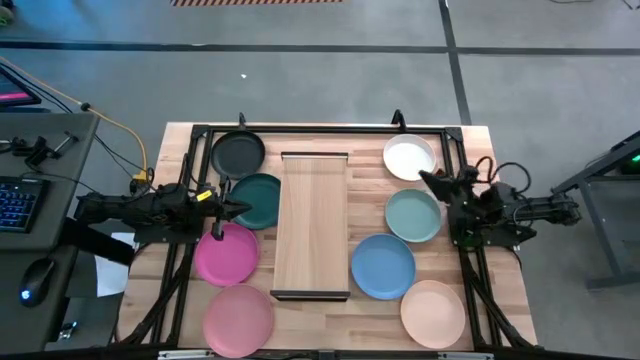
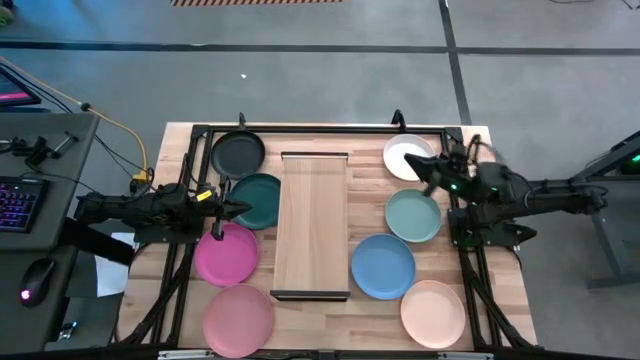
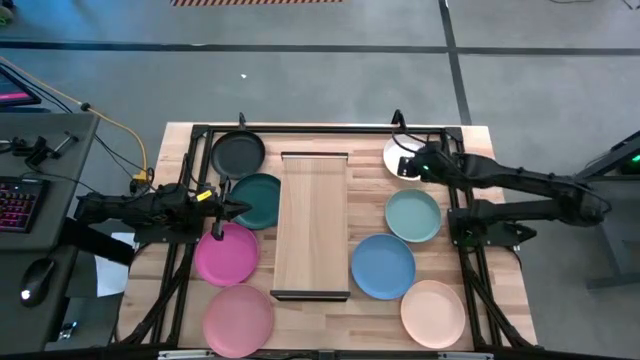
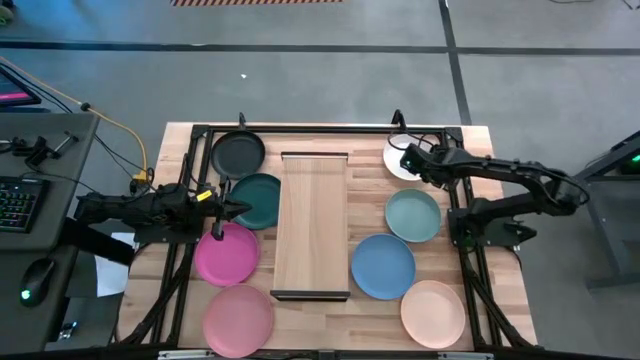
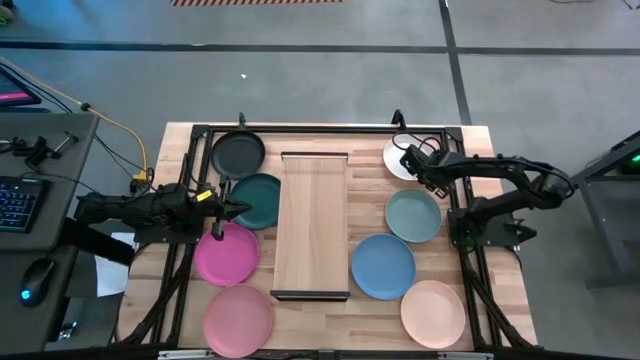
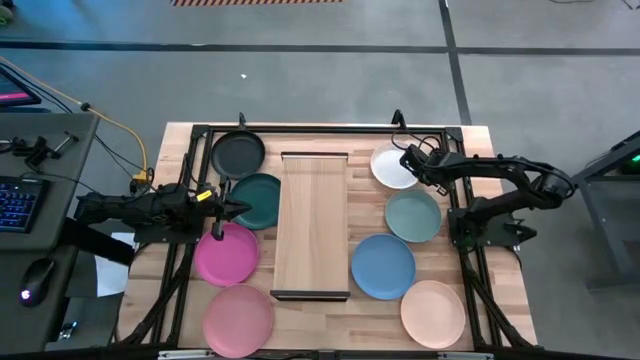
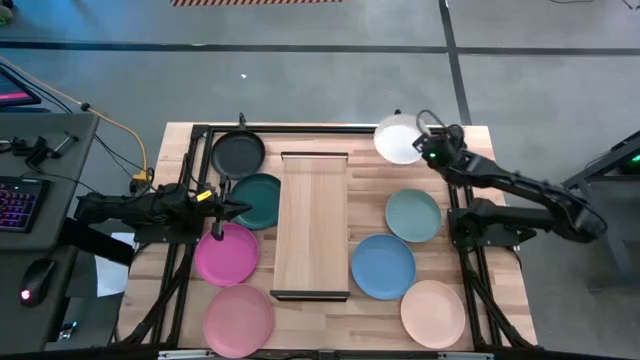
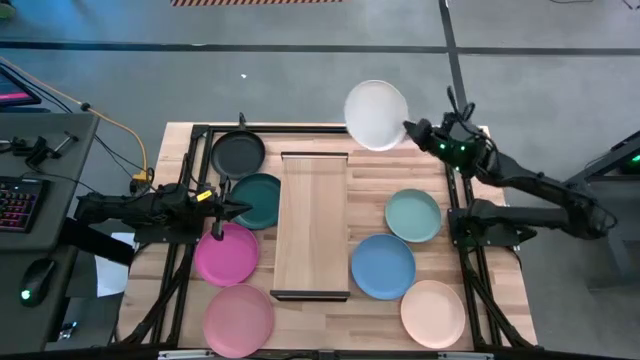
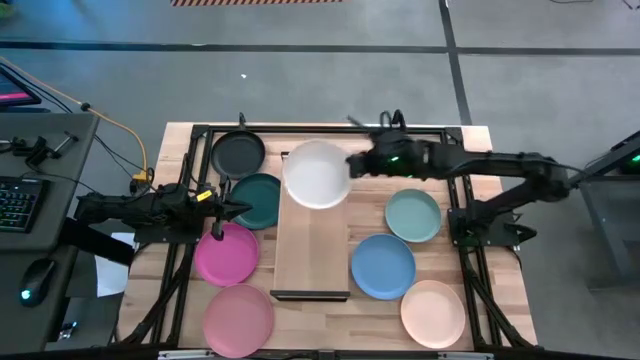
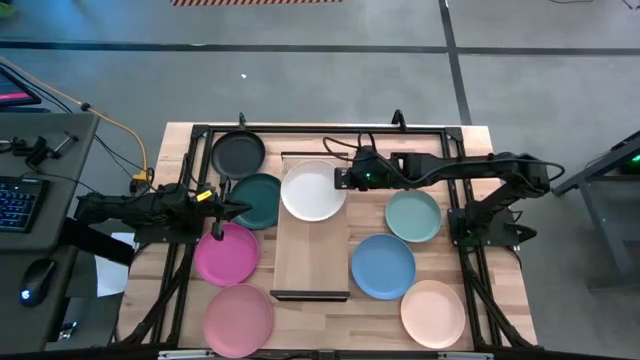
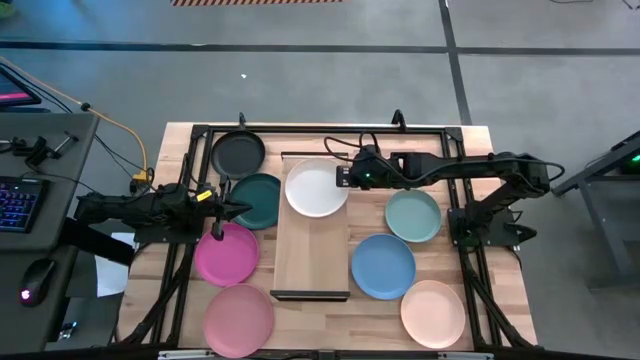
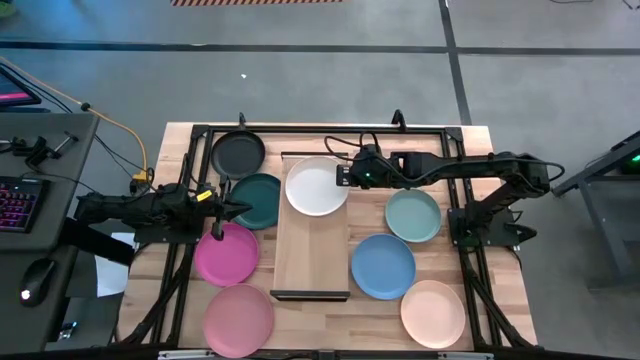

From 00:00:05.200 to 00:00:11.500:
Task: Place and stack plates onto a shelf
Put the white plate on the shelf

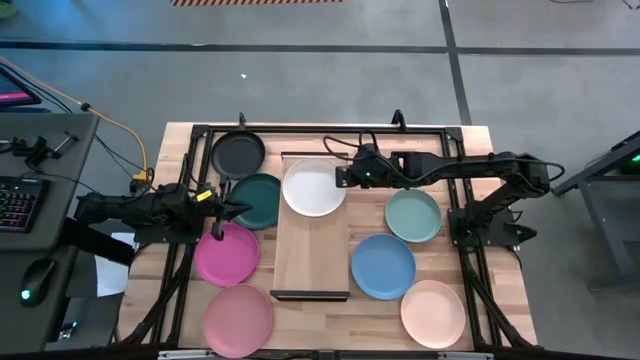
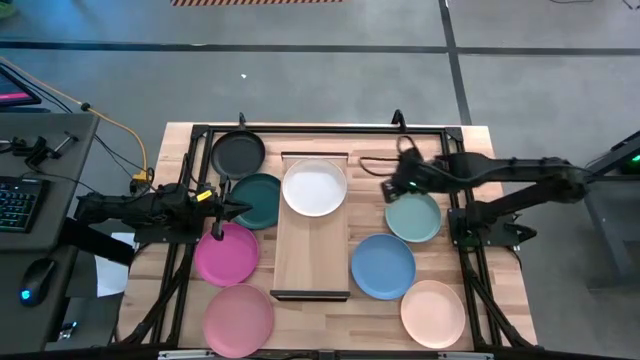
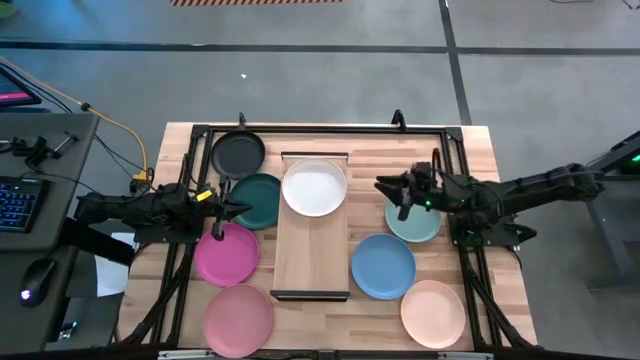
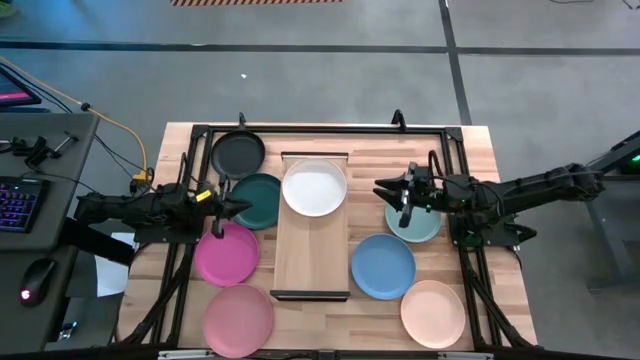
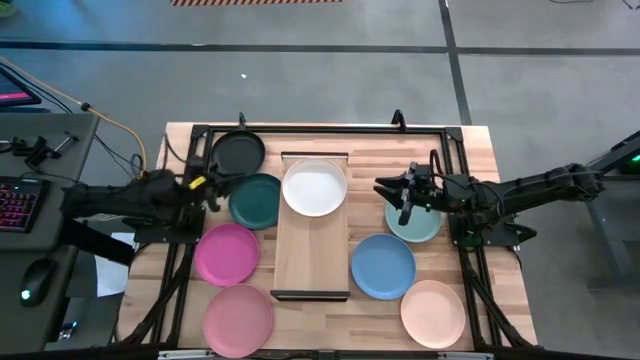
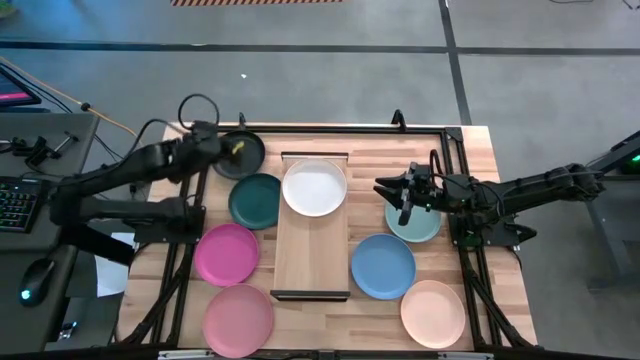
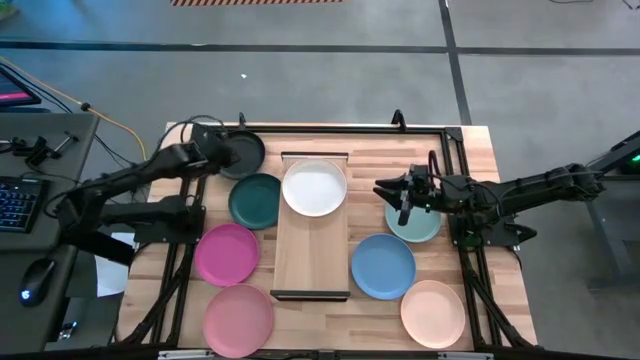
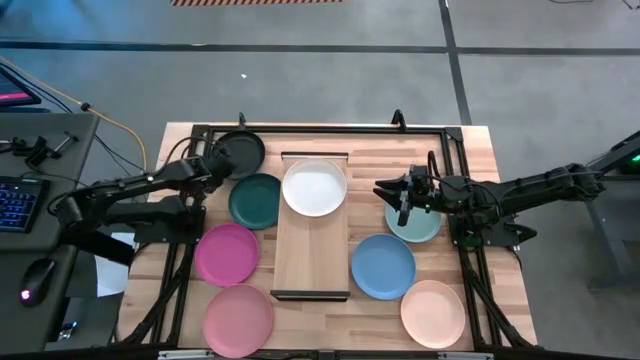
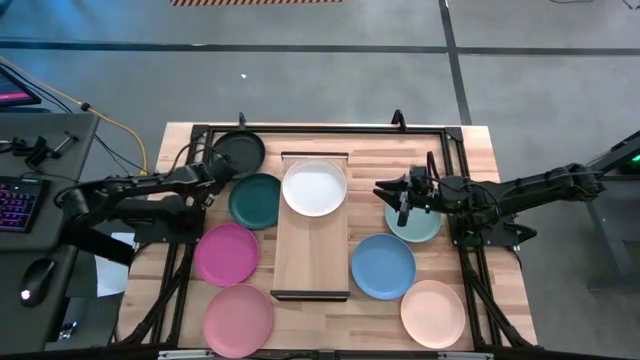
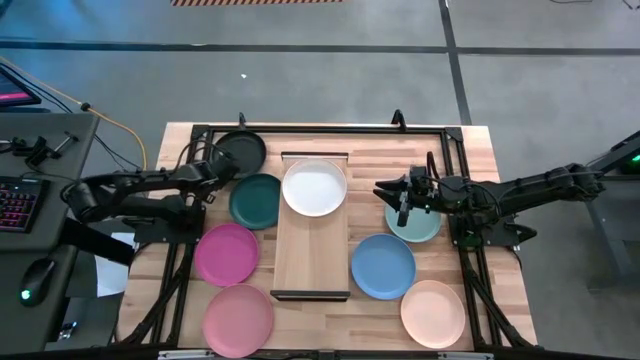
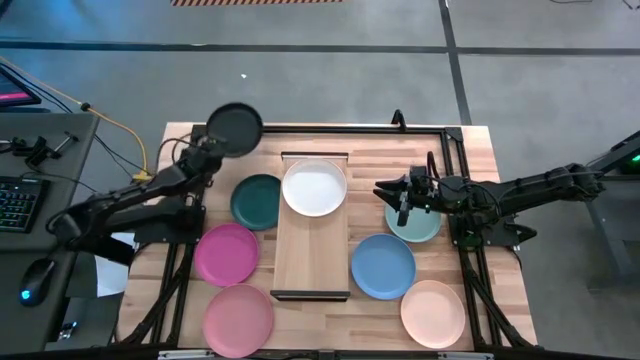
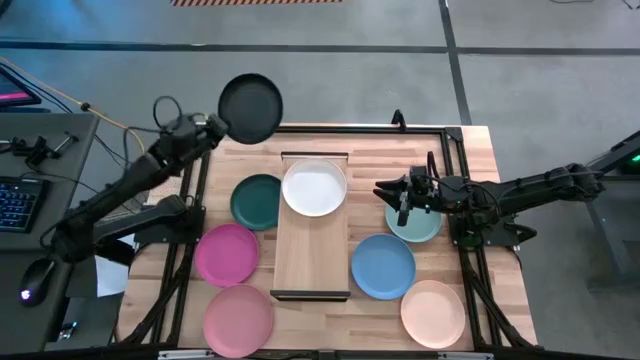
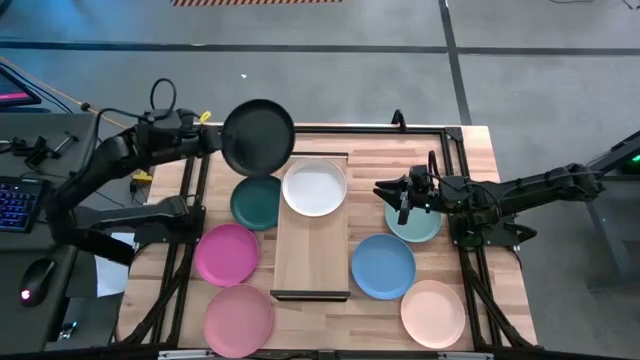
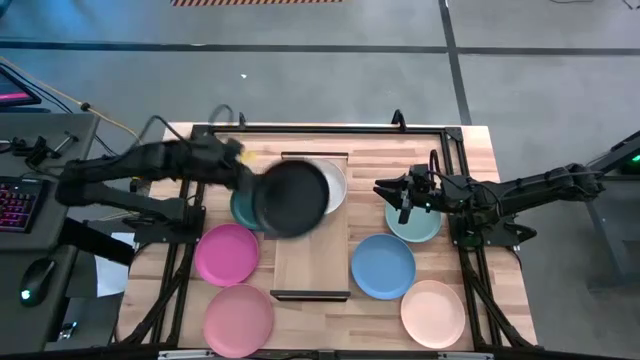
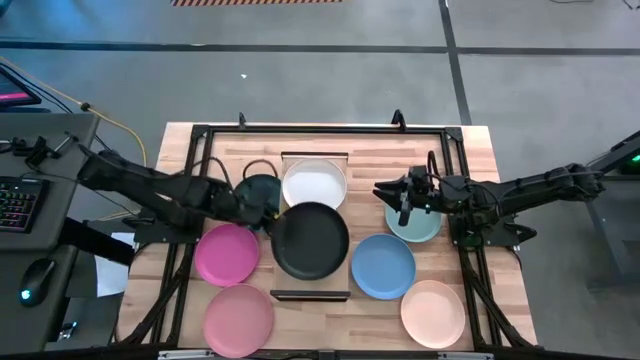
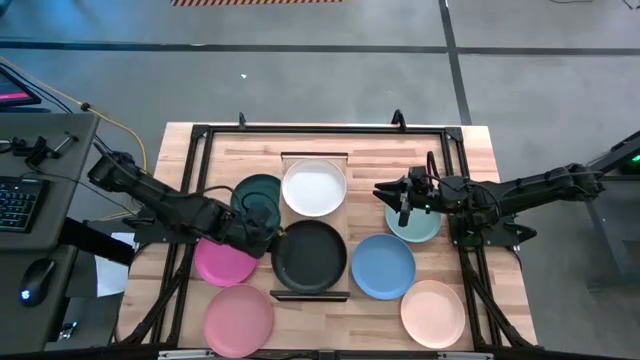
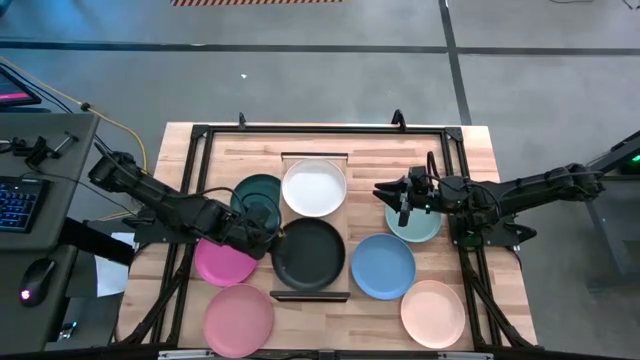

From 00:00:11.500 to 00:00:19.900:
Put the black plate on the shelf

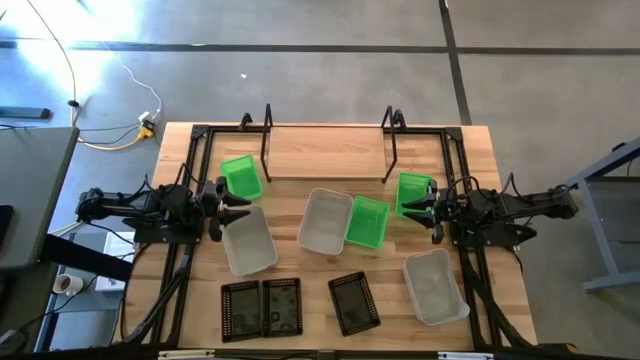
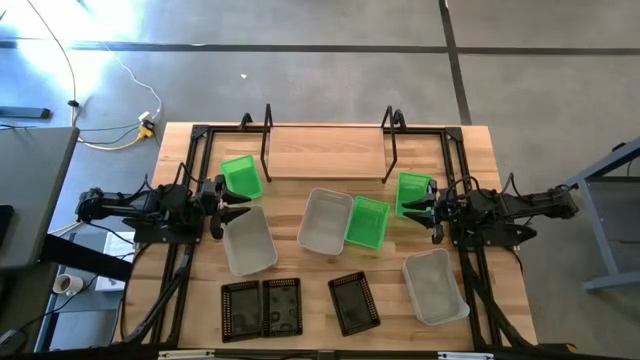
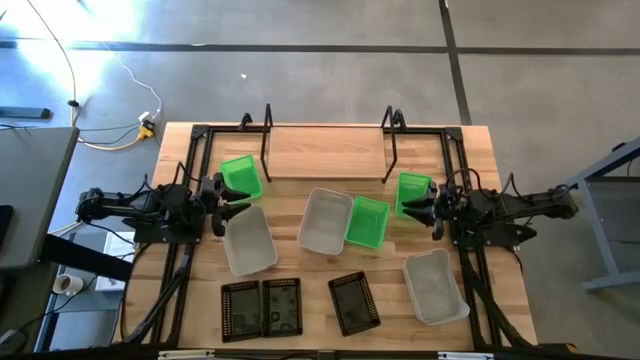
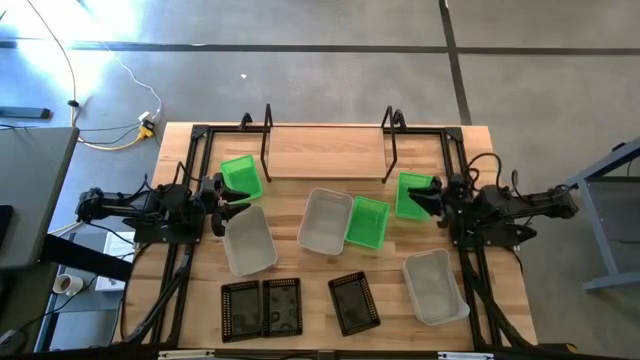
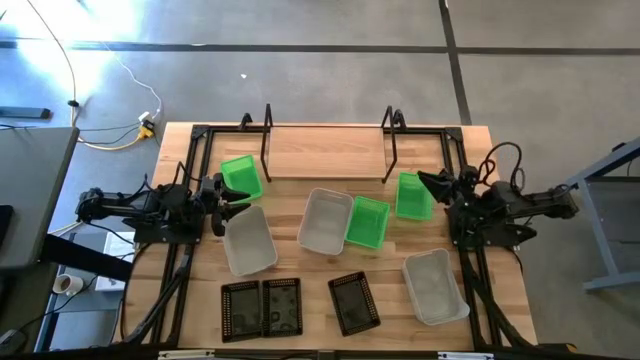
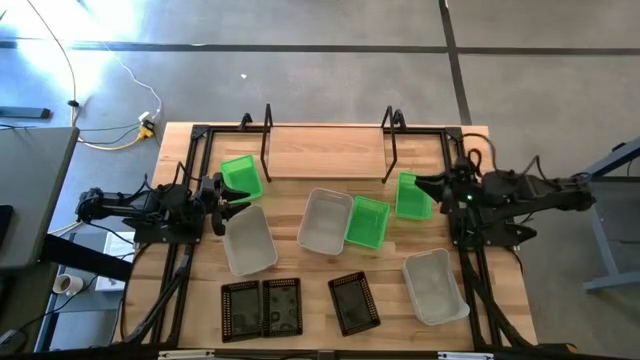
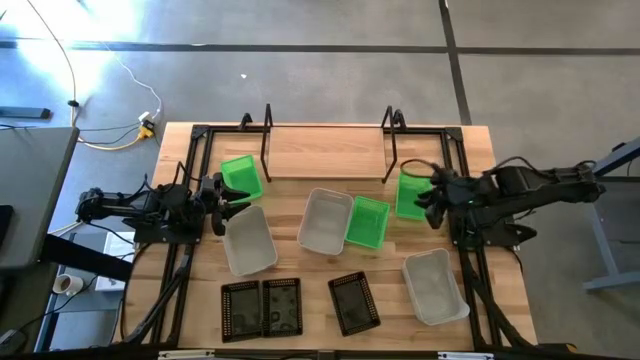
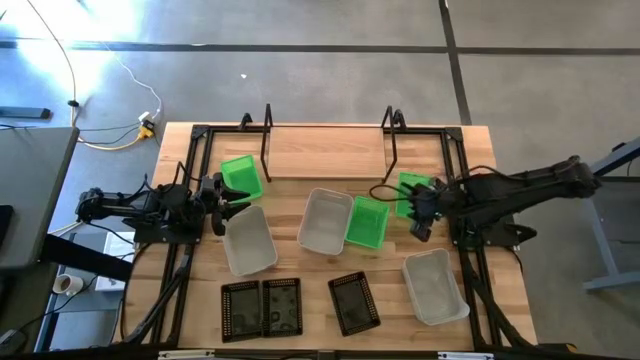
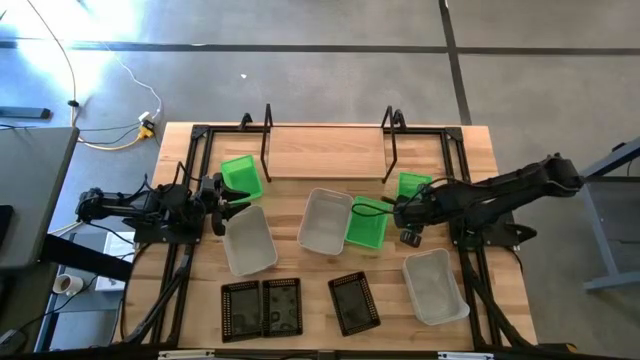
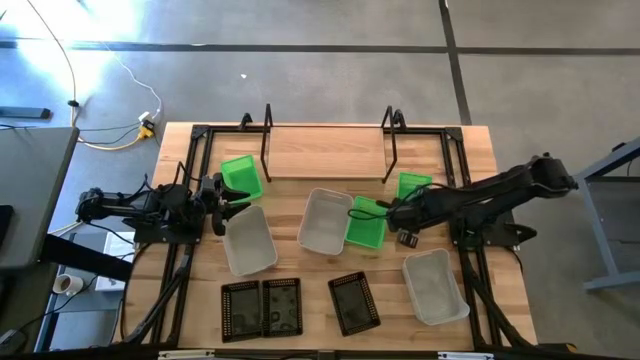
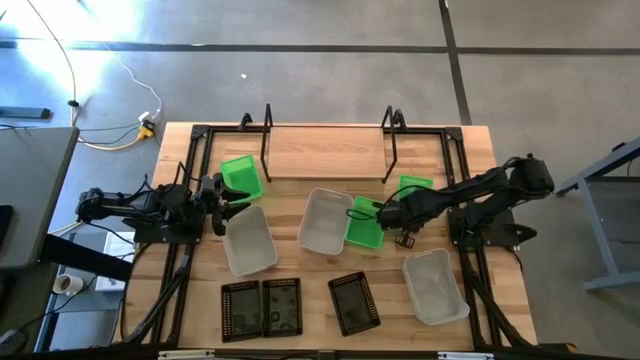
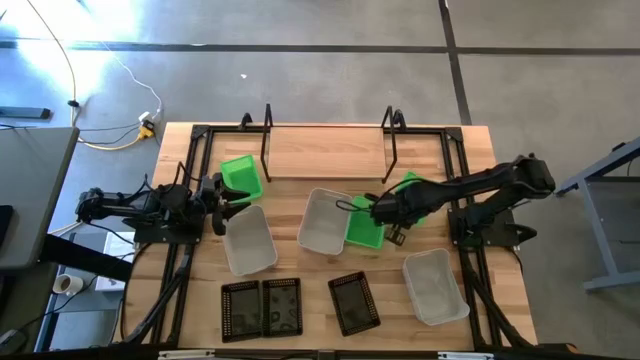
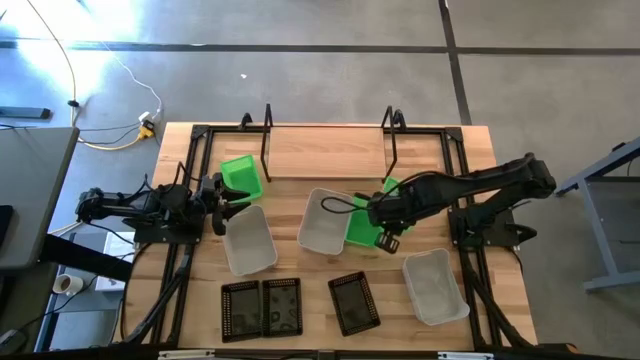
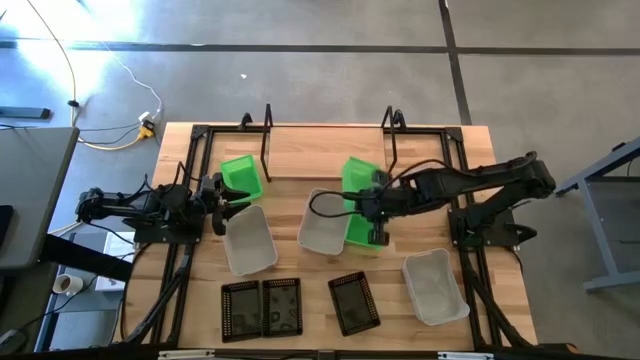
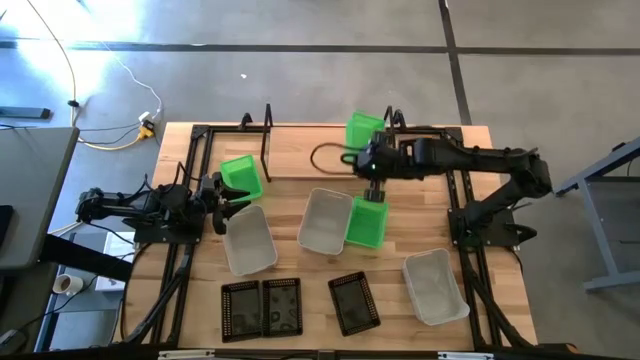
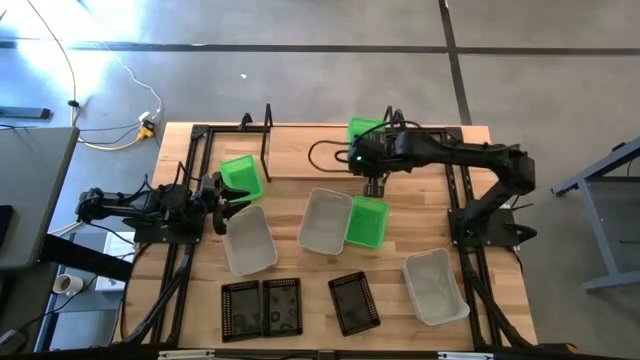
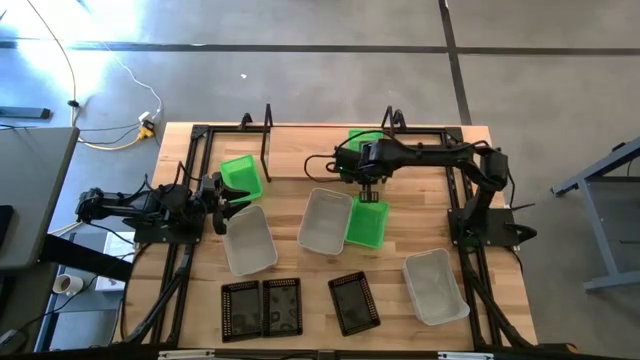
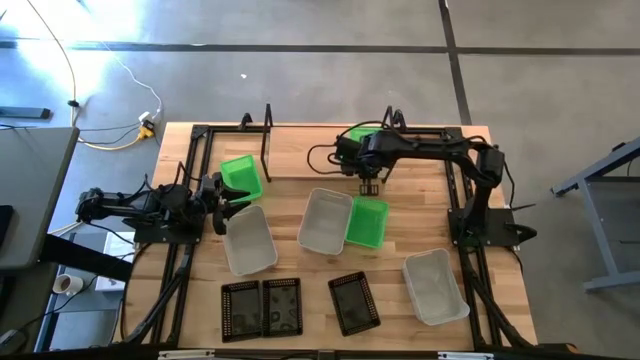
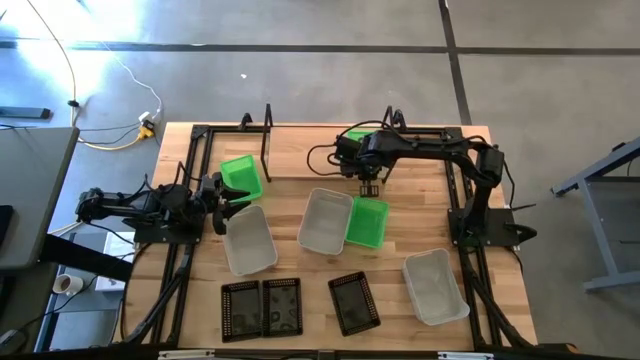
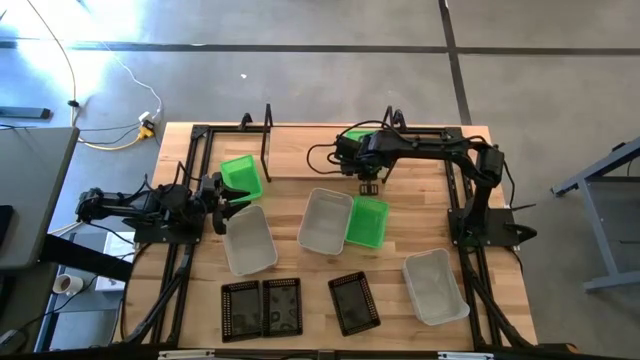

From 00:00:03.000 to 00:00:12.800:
Task: Stack baskets on shelf by color
Put the top right green bin on the shelf
